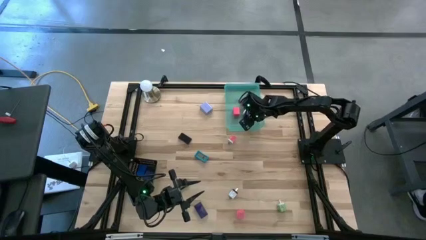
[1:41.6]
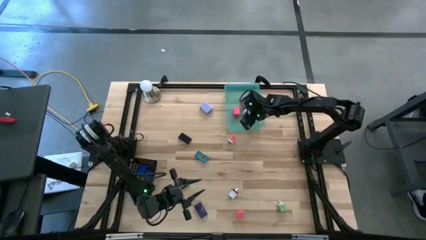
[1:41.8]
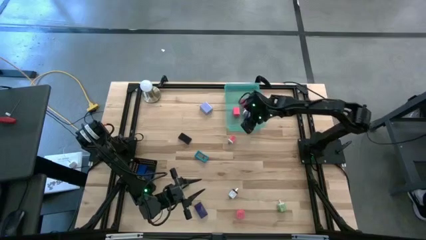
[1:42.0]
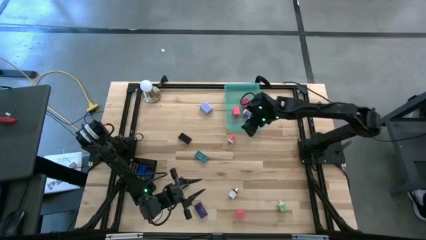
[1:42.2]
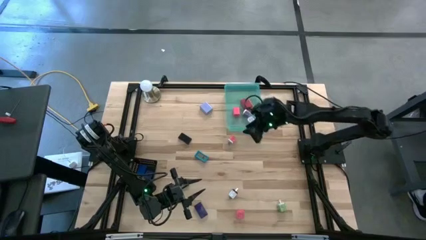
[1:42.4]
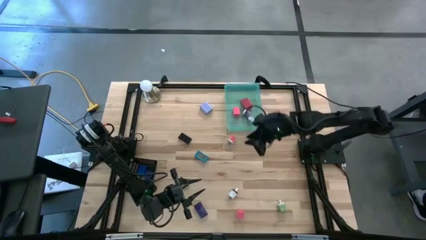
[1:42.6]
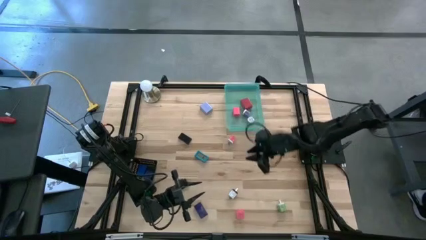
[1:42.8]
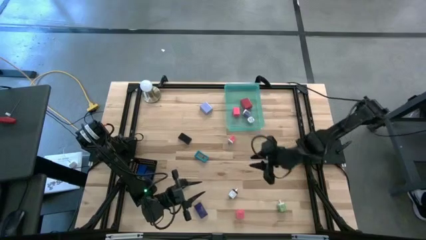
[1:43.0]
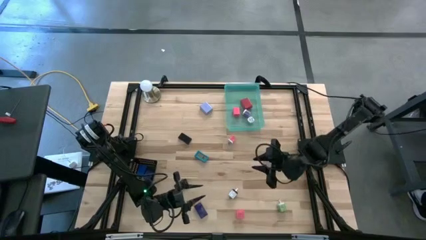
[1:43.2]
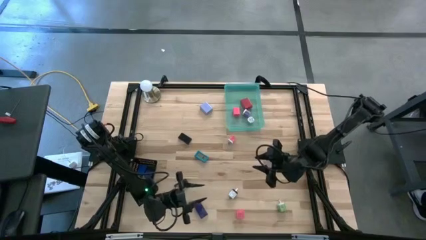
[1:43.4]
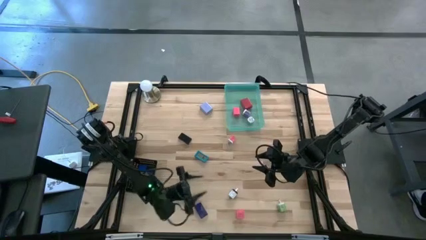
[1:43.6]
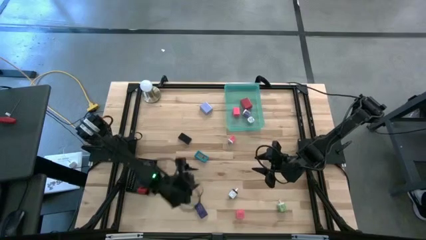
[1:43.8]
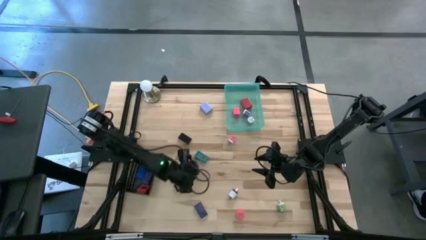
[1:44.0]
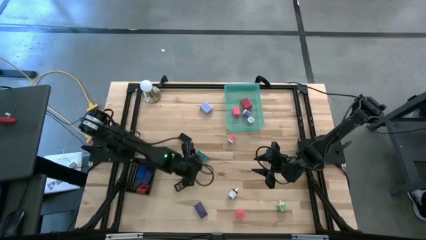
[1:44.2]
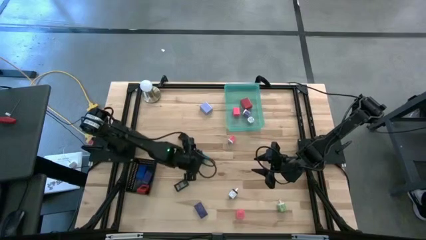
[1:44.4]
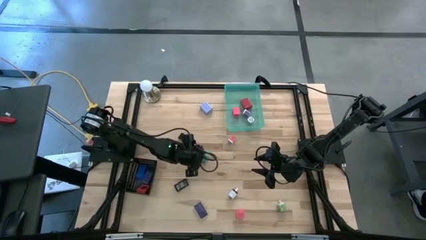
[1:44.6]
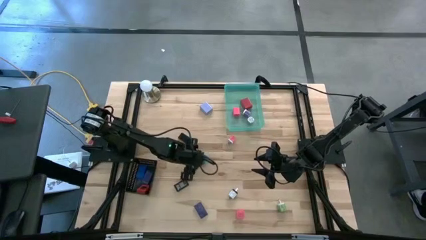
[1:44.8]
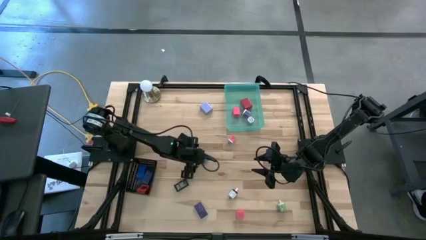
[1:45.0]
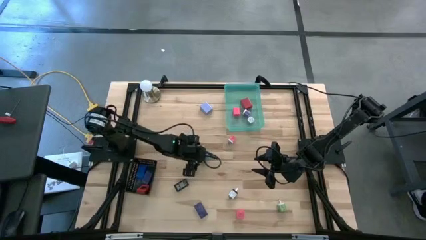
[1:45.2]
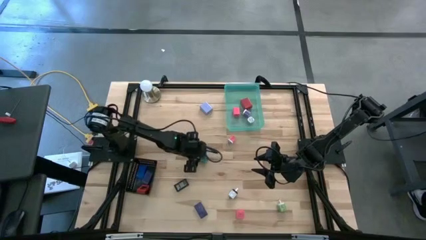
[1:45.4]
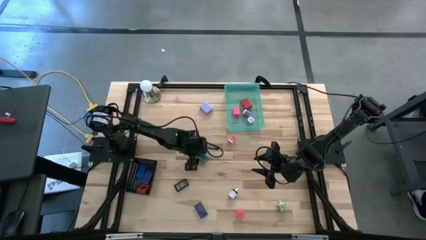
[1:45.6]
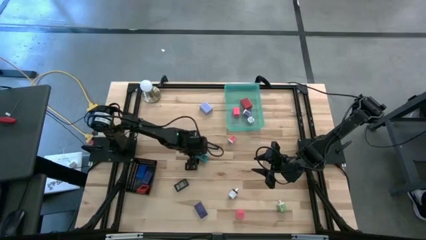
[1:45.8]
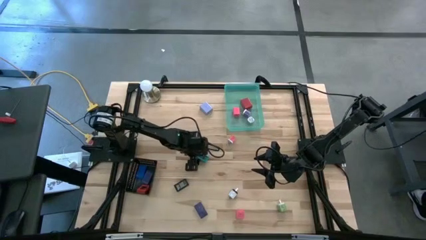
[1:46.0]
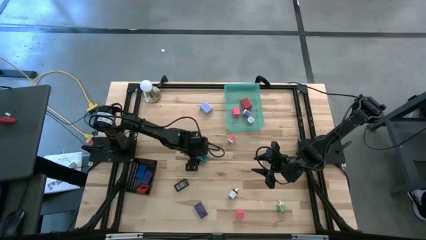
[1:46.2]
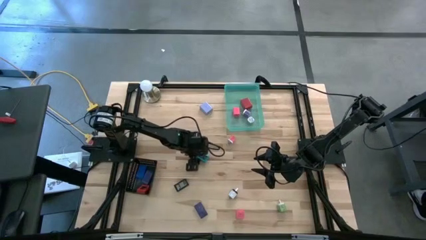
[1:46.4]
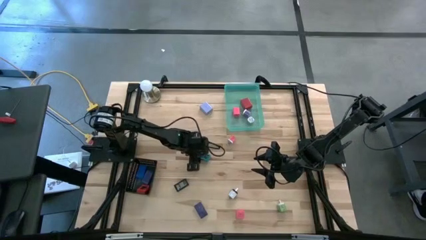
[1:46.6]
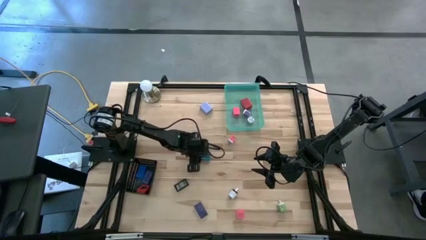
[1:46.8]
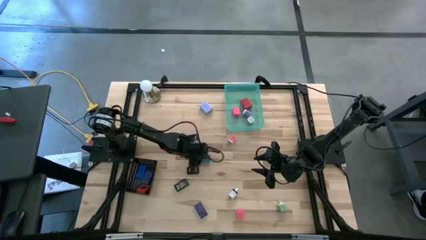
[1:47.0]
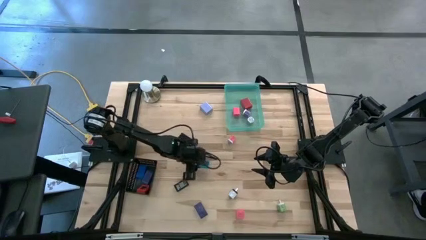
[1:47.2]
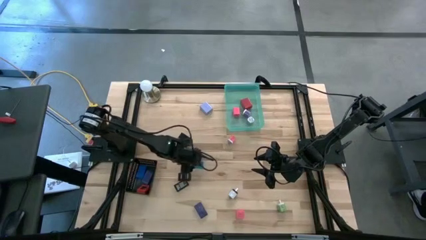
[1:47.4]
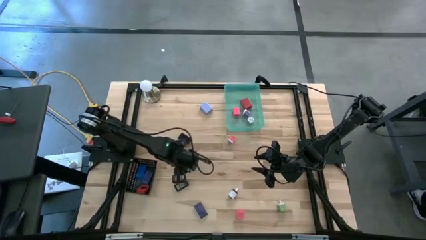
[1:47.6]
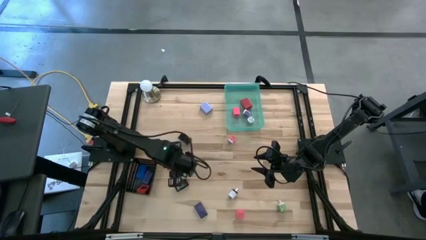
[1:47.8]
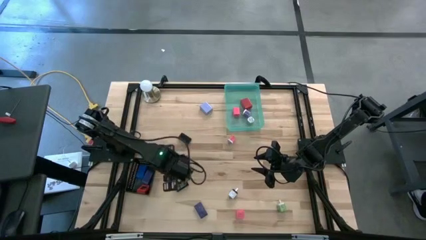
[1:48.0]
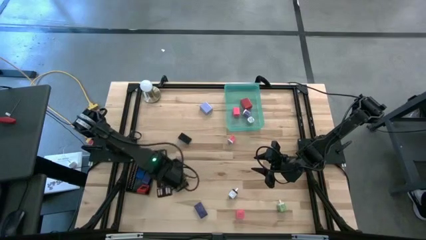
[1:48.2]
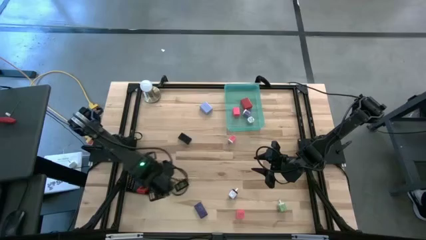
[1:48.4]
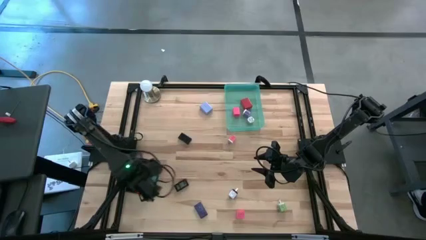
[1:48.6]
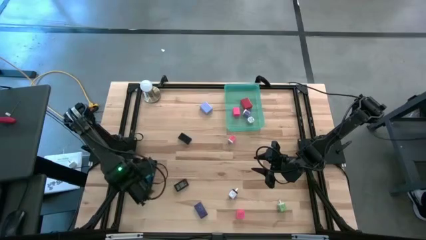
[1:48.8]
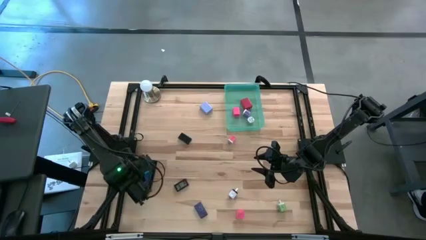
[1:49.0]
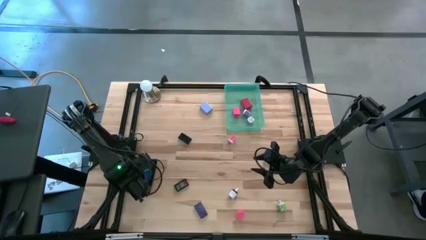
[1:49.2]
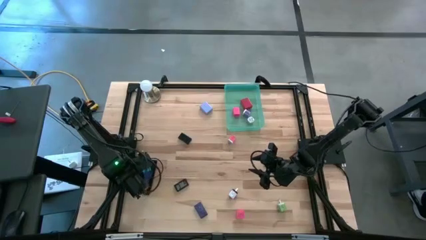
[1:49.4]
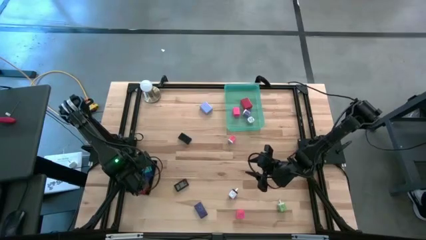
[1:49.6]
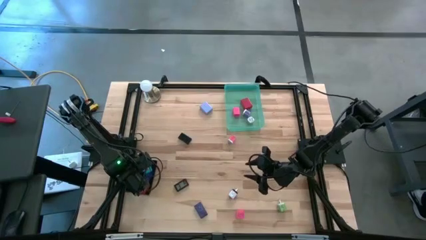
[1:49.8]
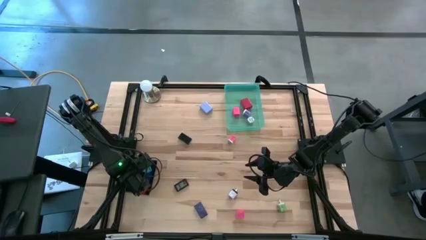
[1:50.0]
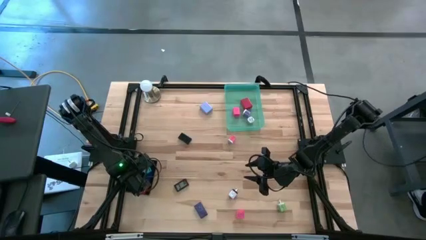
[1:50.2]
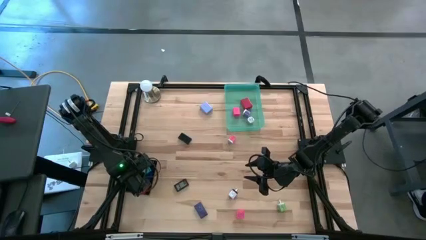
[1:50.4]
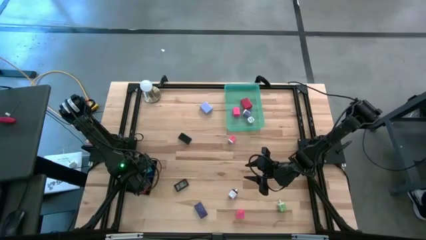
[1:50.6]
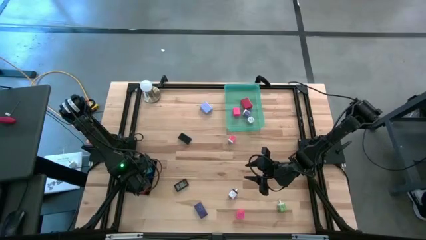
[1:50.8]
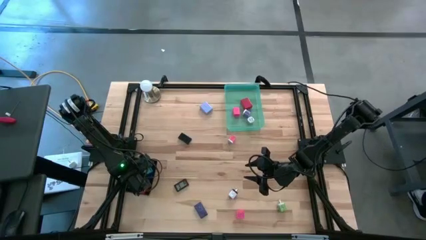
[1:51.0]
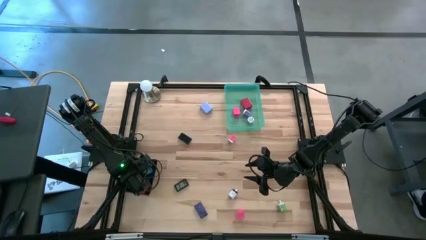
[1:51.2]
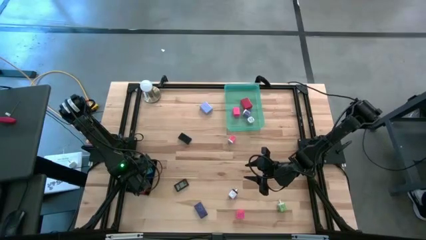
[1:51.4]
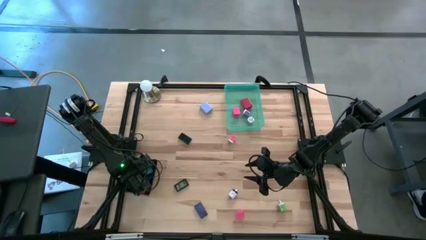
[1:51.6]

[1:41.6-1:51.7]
Task: Pick & Place Office items
Put the light blue digital timer into the black bin
